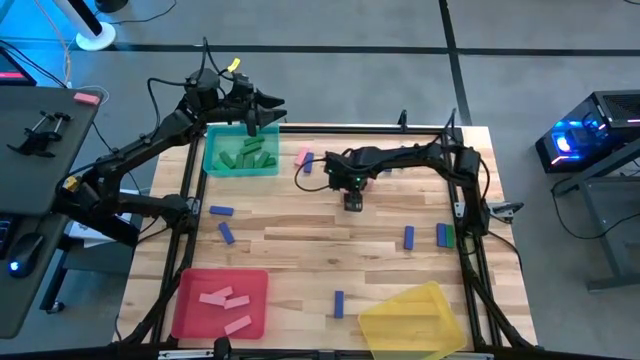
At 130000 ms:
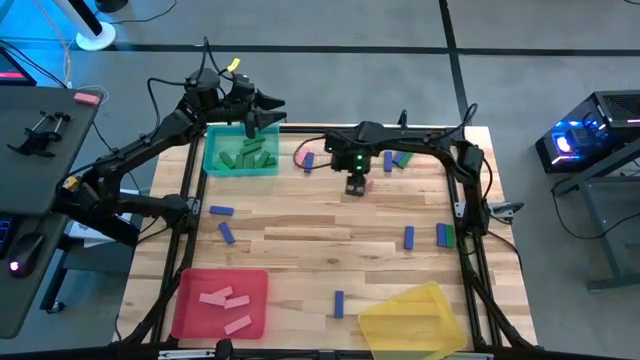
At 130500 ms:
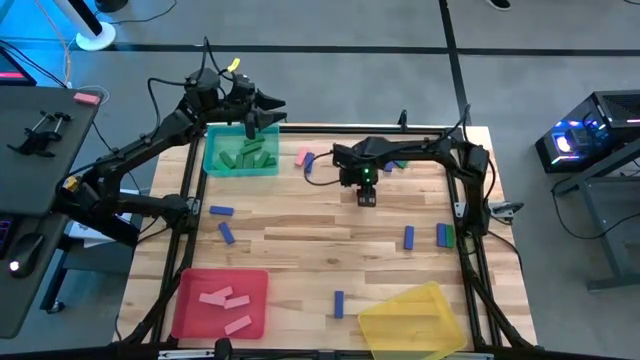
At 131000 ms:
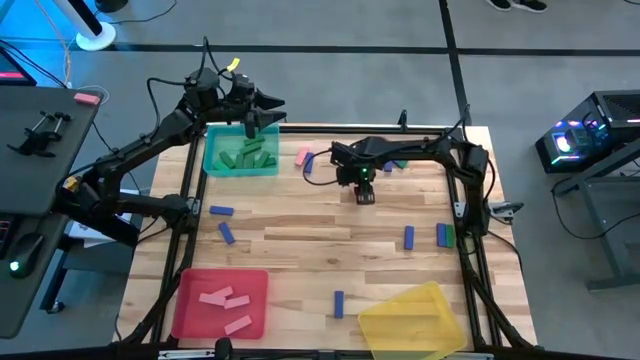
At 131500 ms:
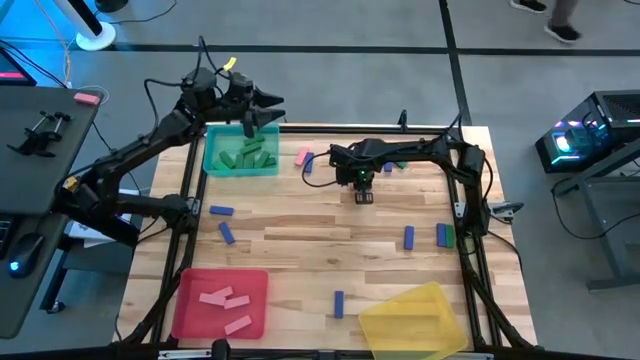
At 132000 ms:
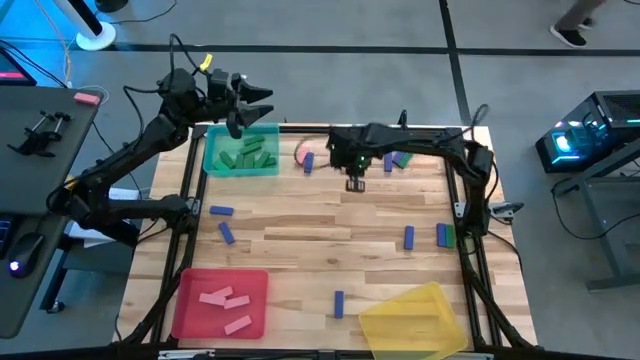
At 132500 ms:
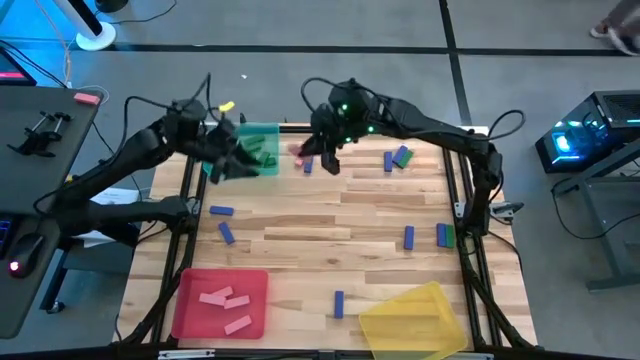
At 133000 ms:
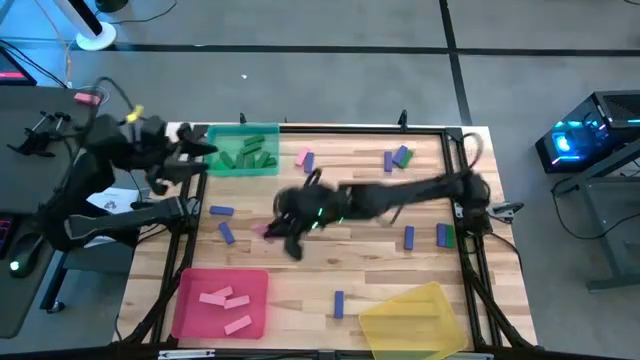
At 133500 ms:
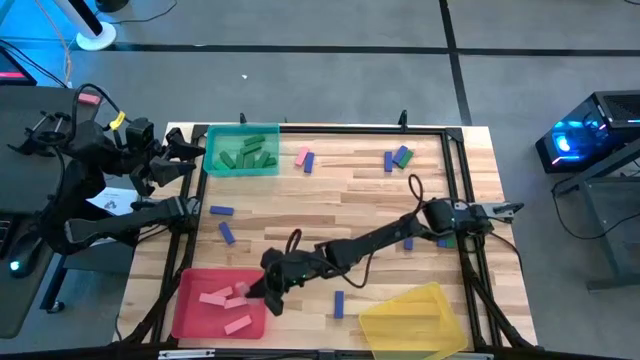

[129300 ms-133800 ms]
Task: Sort blocks
Put the pink block into the pink bin

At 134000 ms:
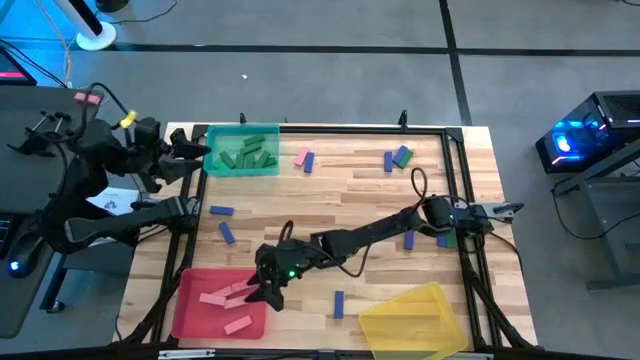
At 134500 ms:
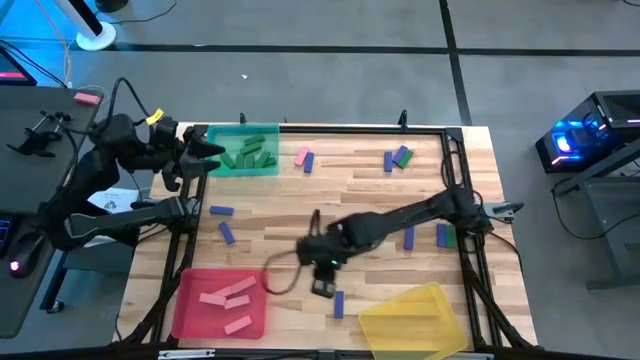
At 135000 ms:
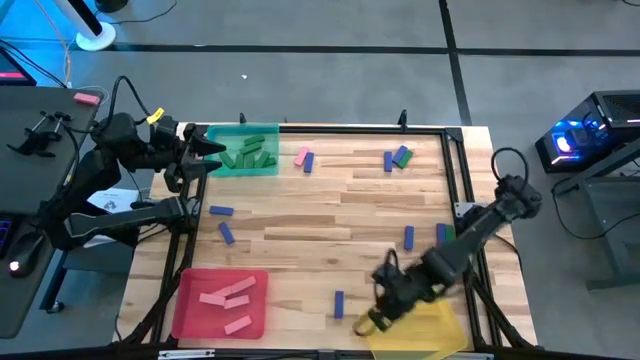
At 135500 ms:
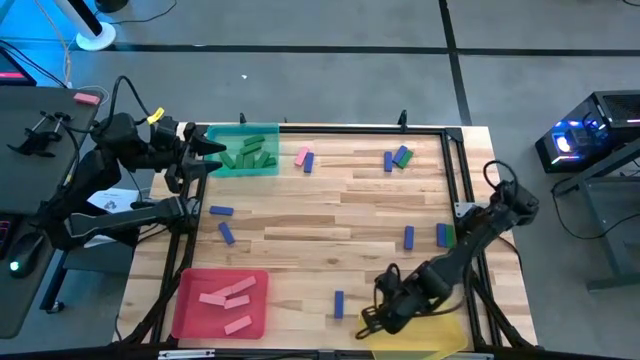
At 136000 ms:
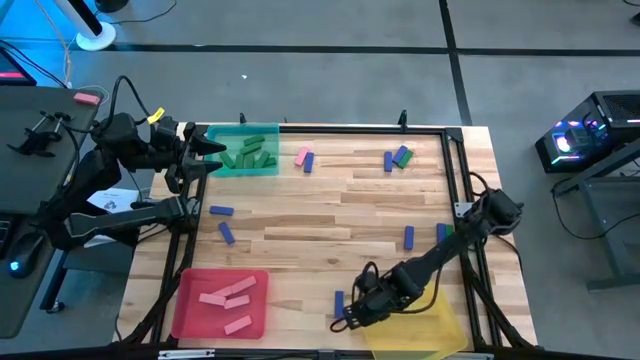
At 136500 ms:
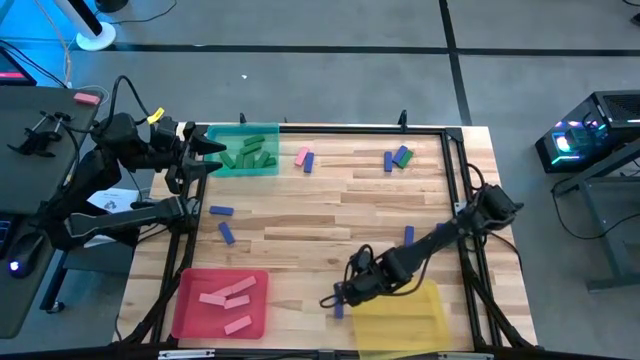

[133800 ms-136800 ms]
Adjust the yellow bin

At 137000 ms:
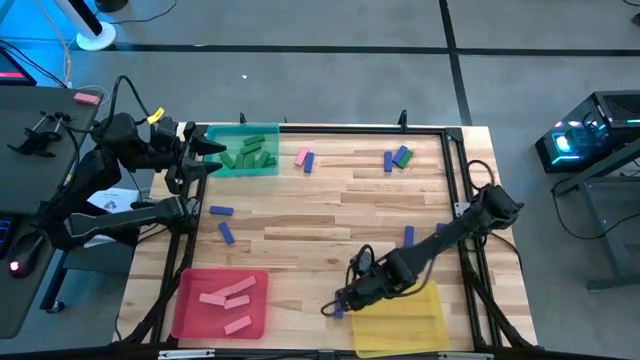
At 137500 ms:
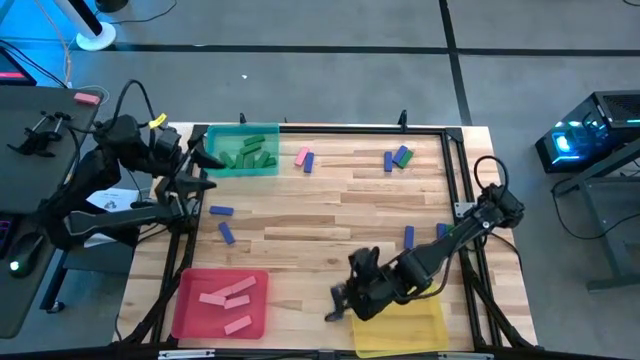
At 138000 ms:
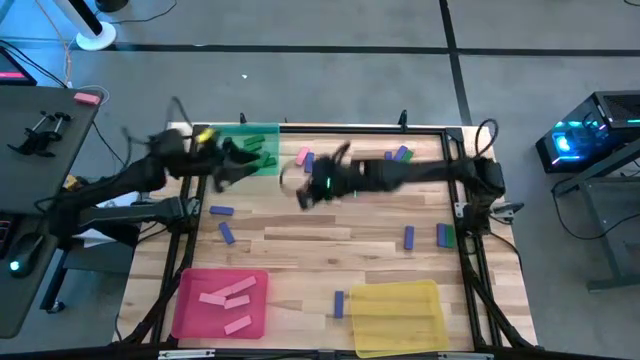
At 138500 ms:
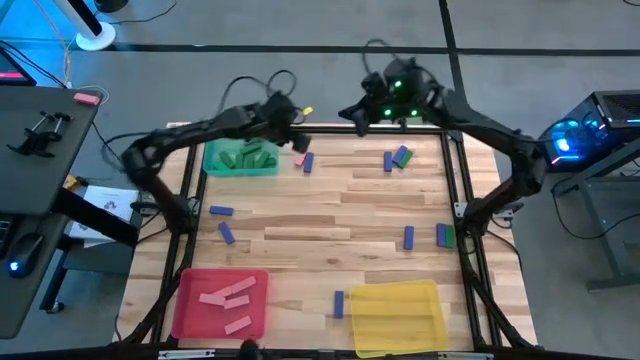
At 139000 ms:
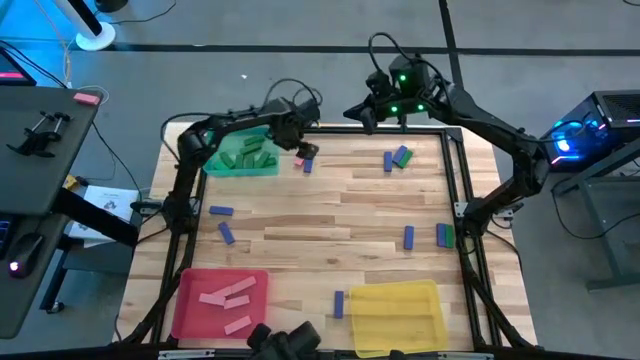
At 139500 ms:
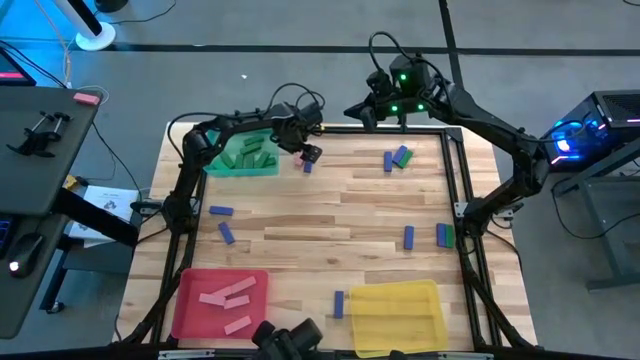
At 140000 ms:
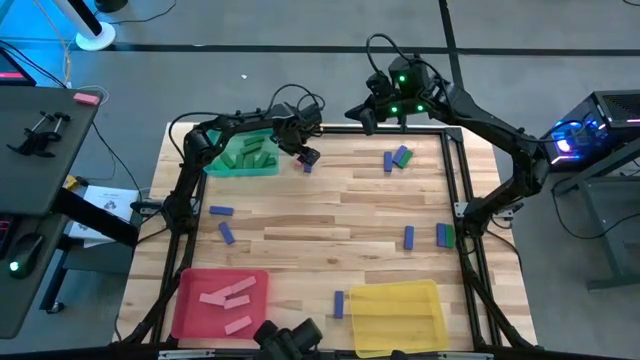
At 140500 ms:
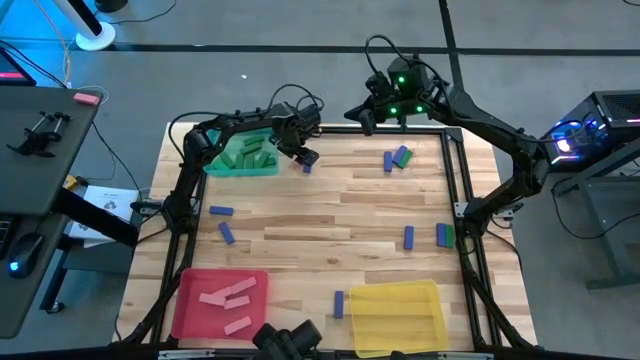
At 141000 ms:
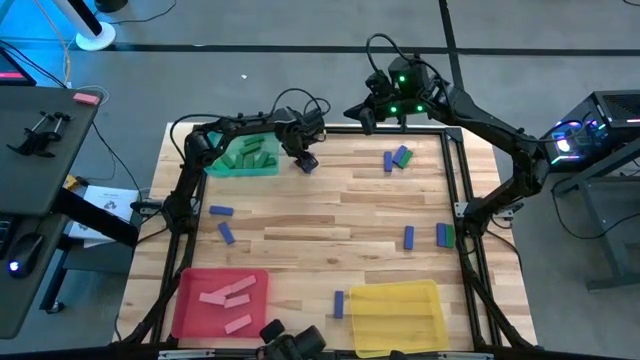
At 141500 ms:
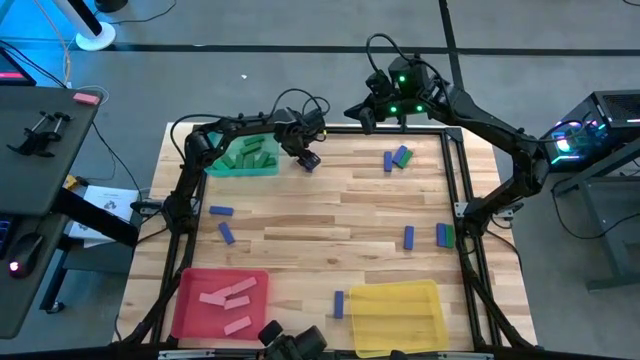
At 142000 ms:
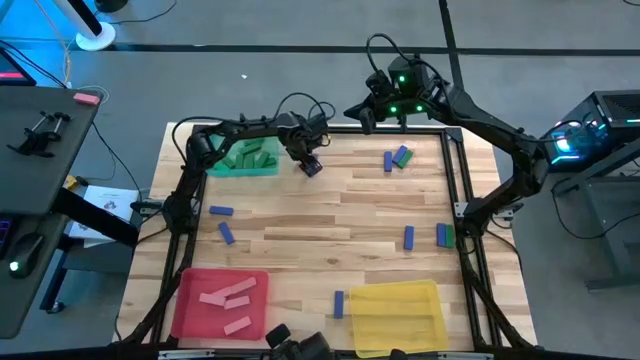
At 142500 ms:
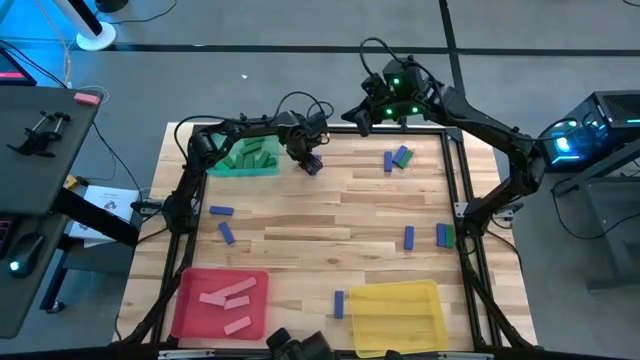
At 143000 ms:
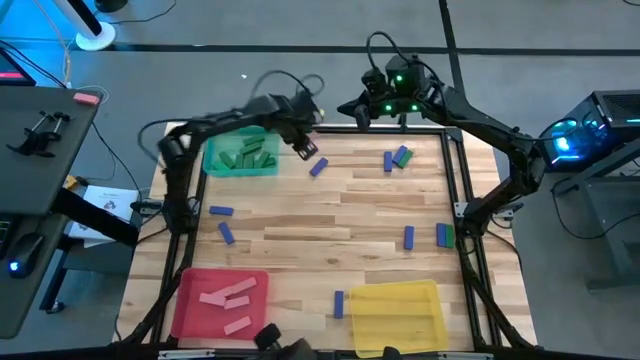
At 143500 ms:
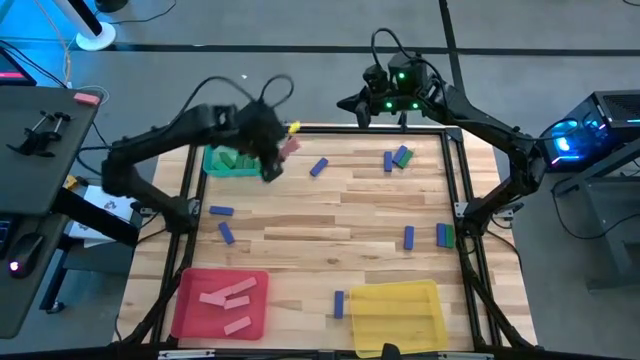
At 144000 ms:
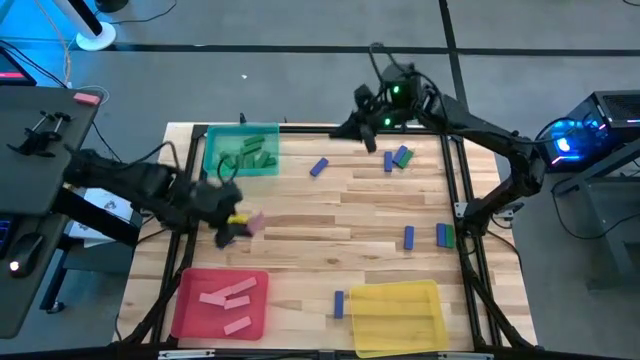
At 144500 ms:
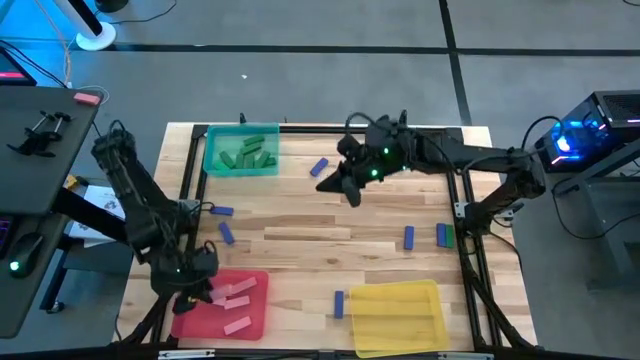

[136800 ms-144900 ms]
Put the pink block into the pink bin

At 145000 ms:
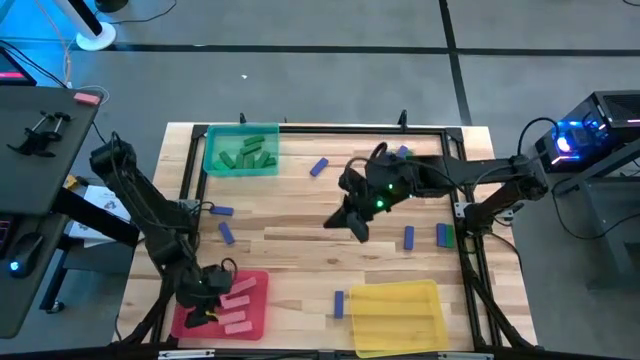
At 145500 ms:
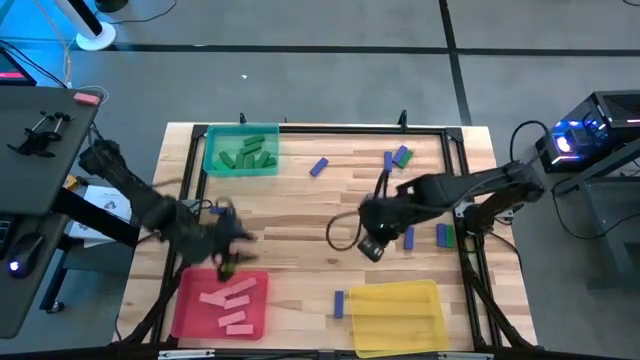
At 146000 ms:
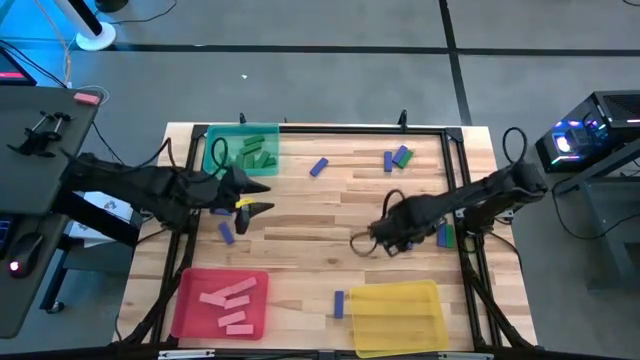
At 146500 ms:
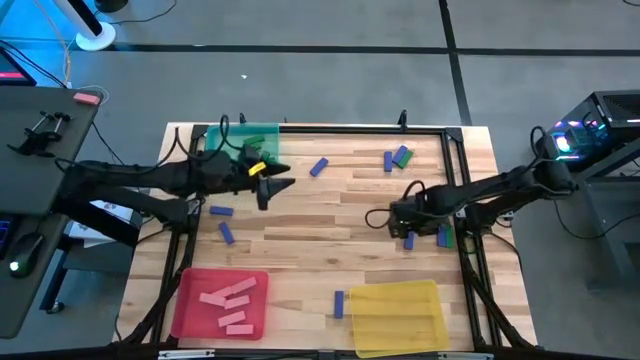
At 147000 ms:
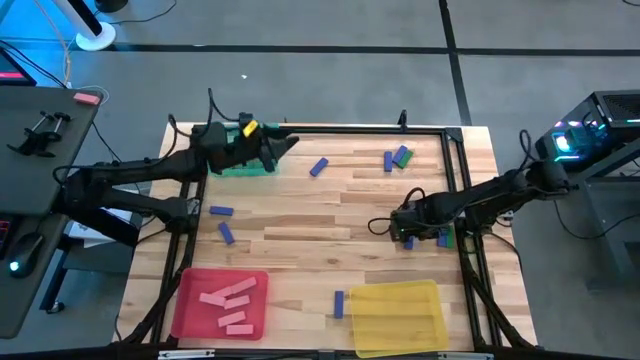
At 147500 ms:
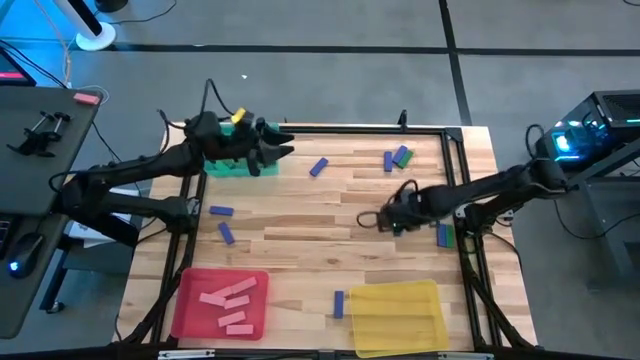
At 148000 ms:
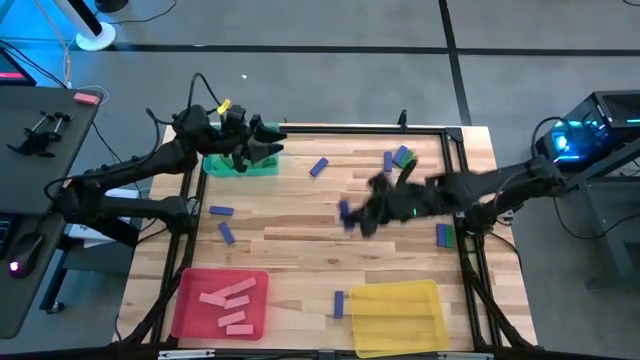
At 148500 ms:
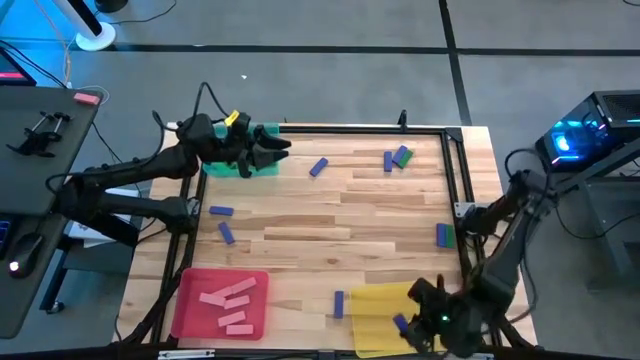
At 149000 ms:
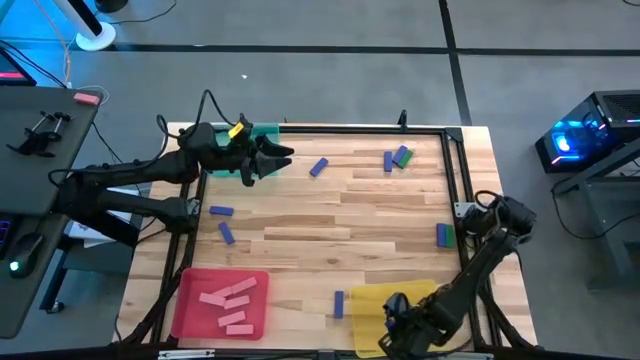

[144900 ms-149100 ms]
Put the blue block into the yellow bin

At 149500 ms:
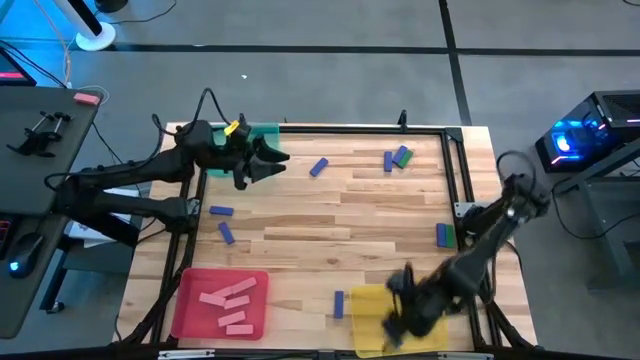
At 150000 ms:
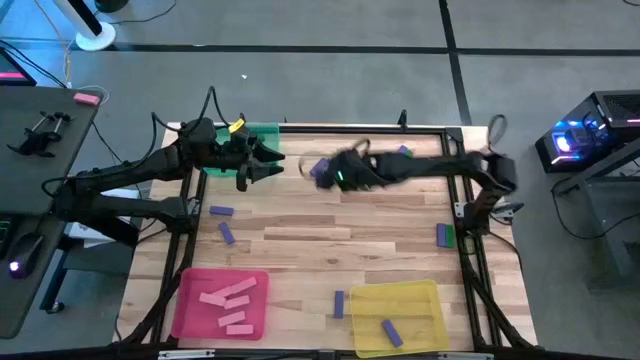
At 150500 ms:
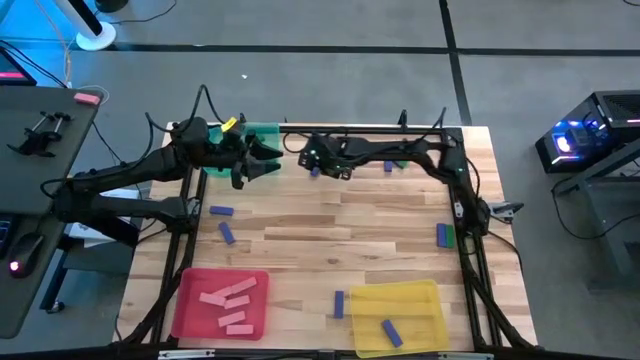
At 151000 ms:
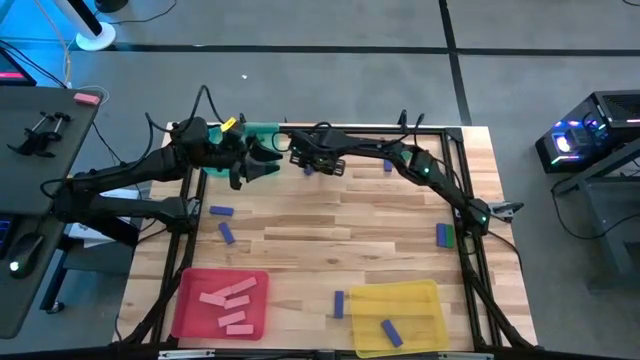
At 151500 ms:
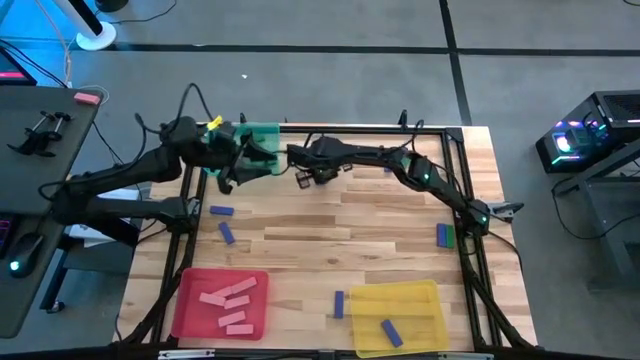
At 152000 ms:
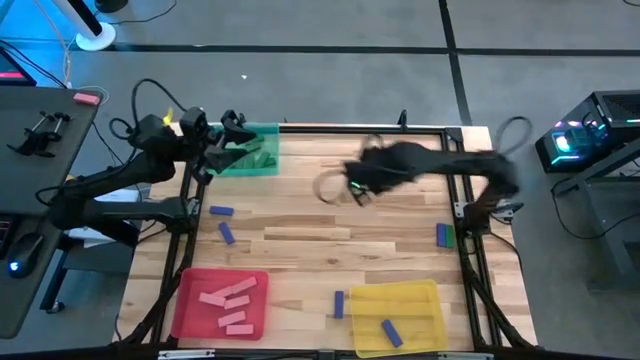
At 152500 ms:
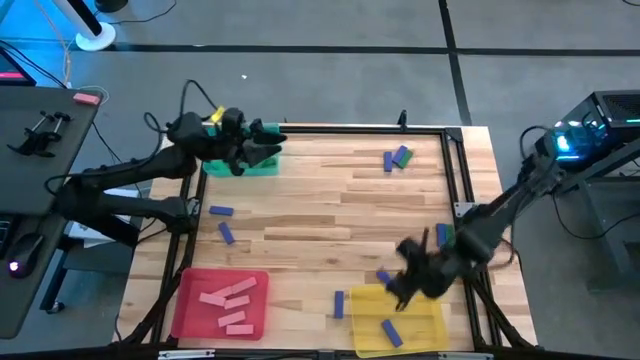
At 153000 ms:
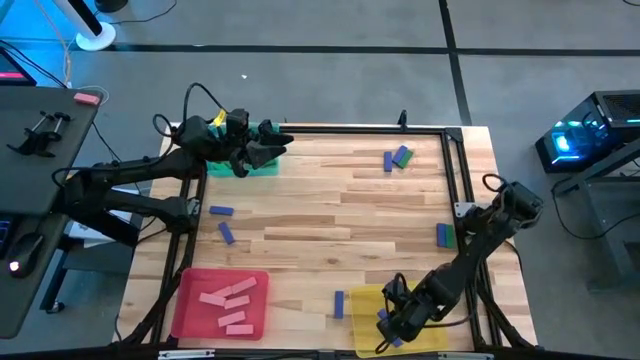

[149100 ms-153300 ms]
Put the blue block into the yellow bin
